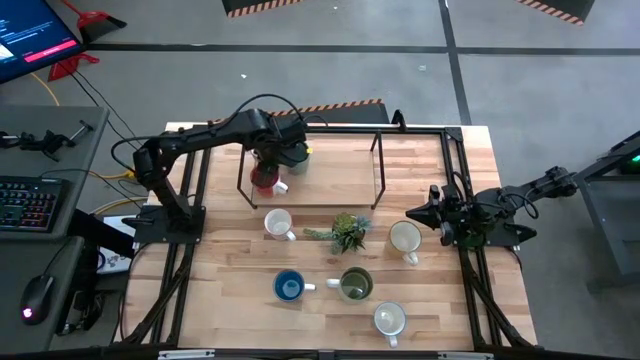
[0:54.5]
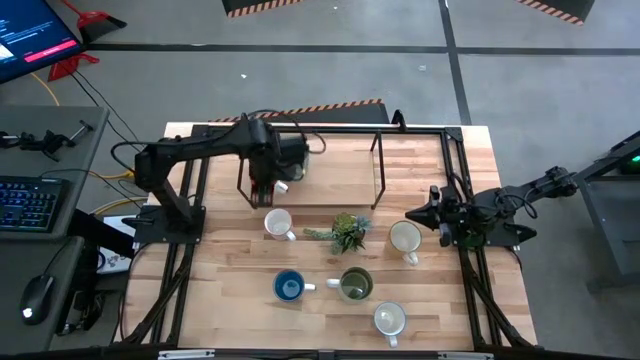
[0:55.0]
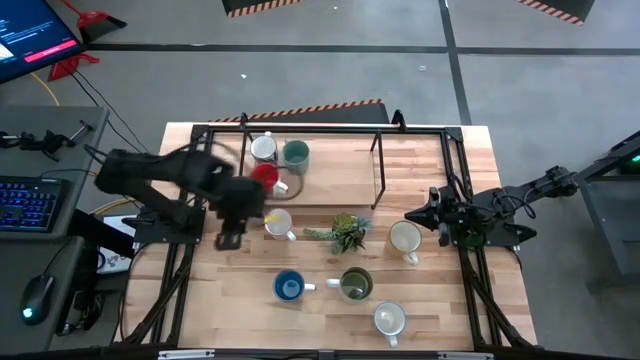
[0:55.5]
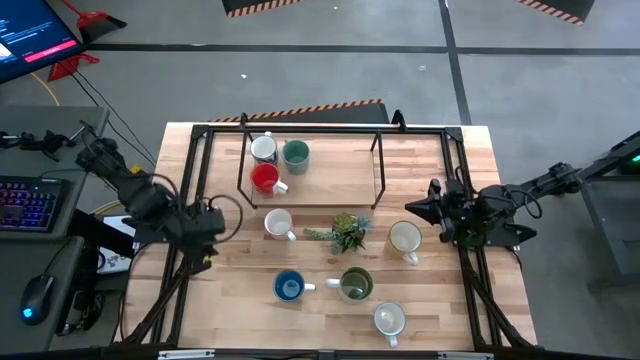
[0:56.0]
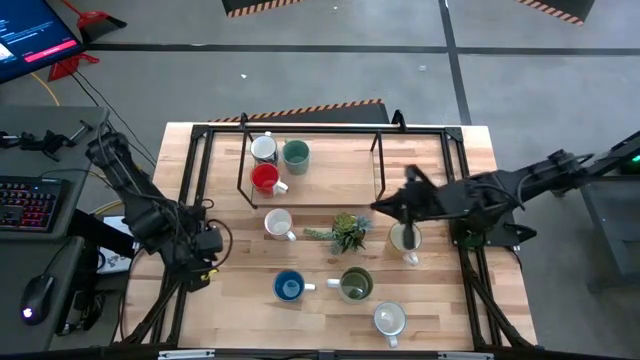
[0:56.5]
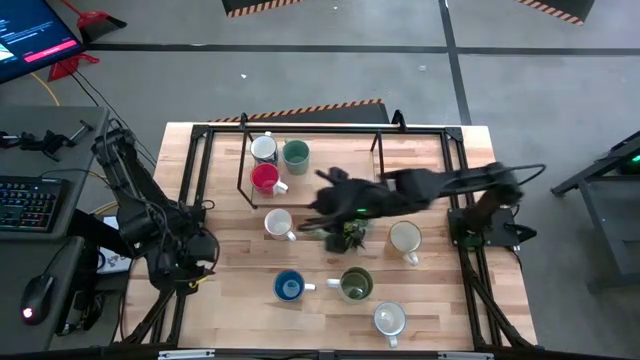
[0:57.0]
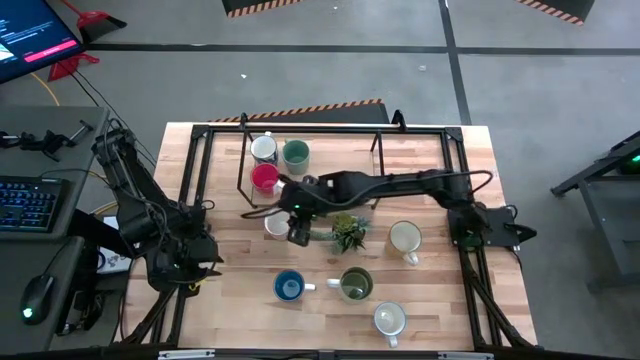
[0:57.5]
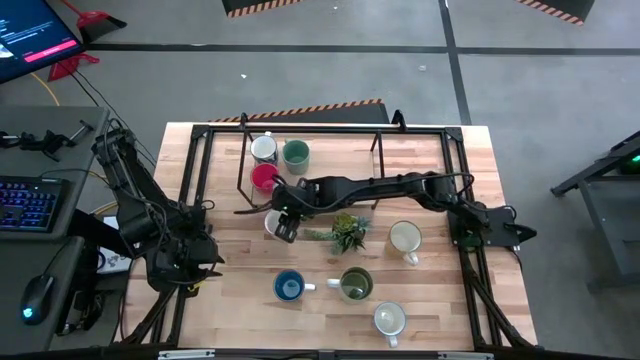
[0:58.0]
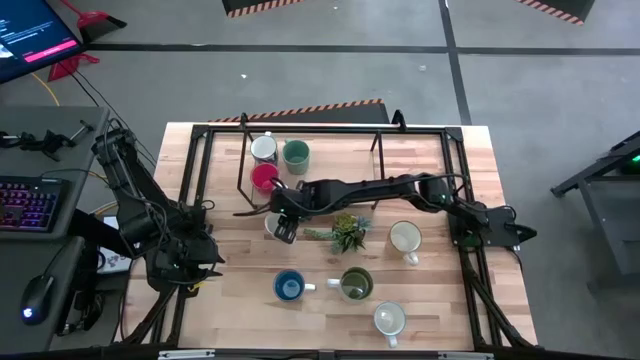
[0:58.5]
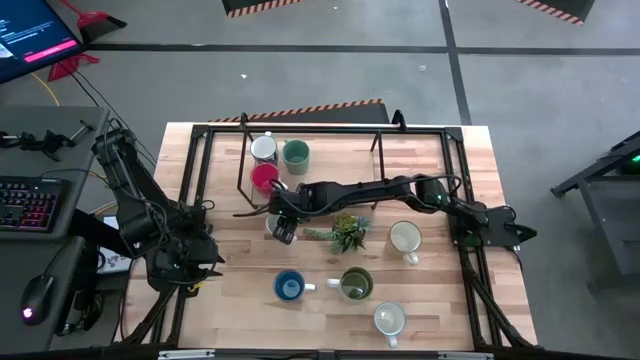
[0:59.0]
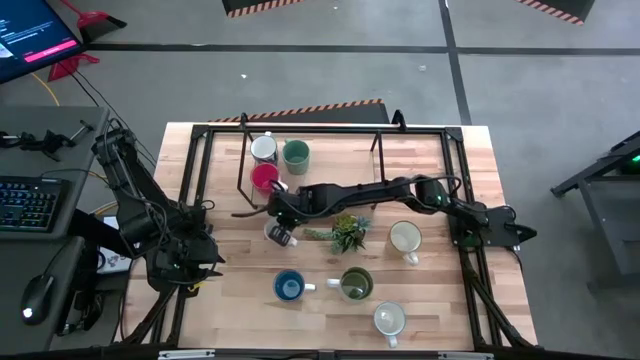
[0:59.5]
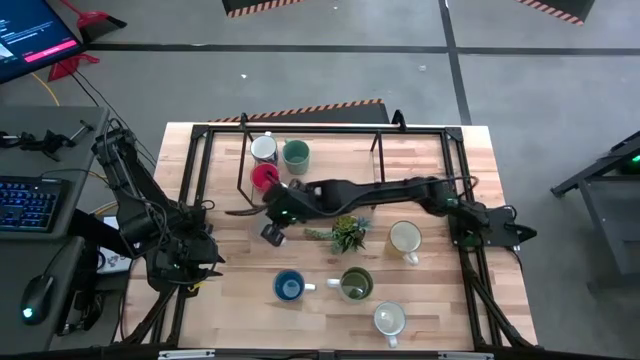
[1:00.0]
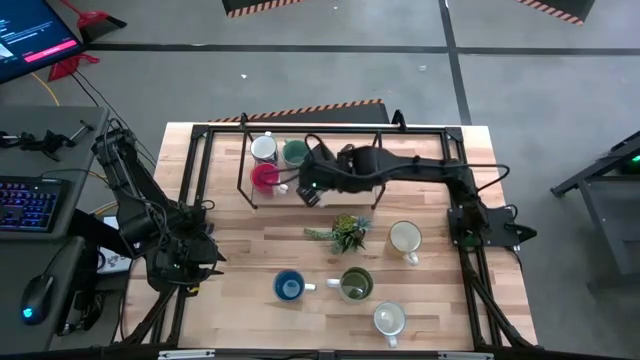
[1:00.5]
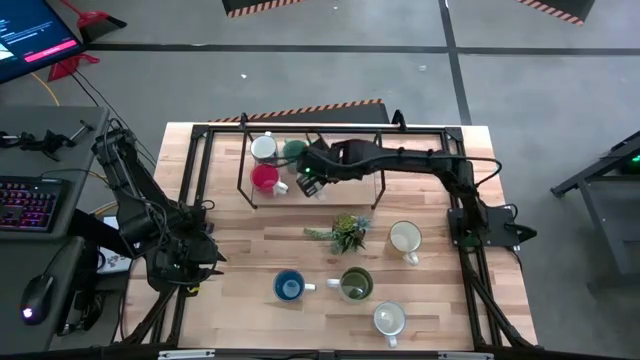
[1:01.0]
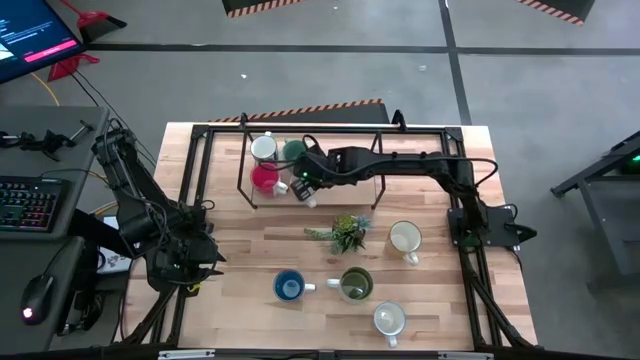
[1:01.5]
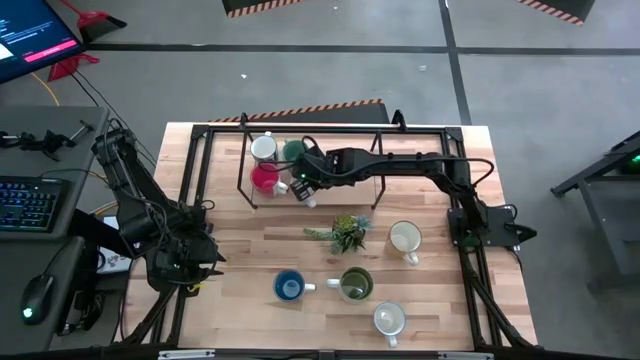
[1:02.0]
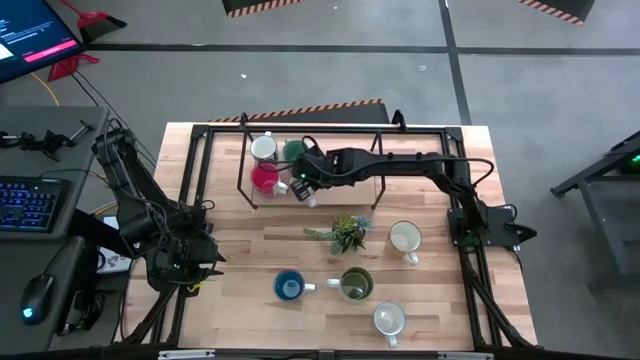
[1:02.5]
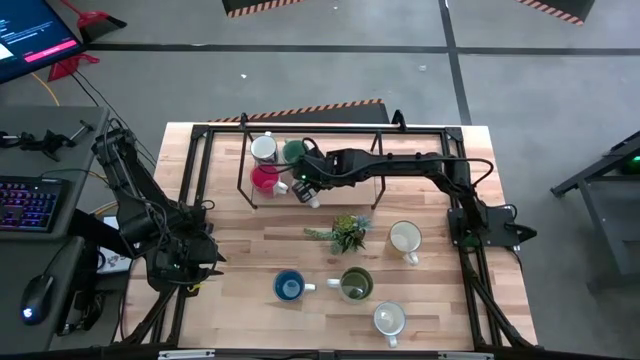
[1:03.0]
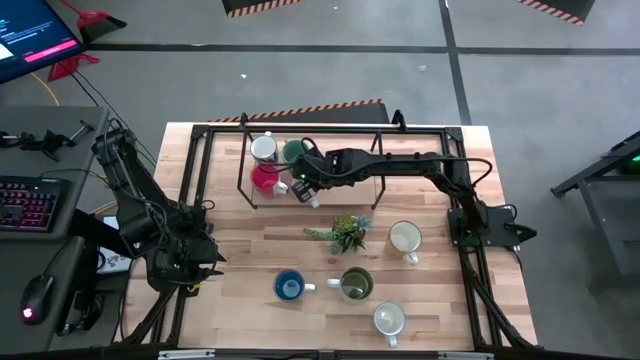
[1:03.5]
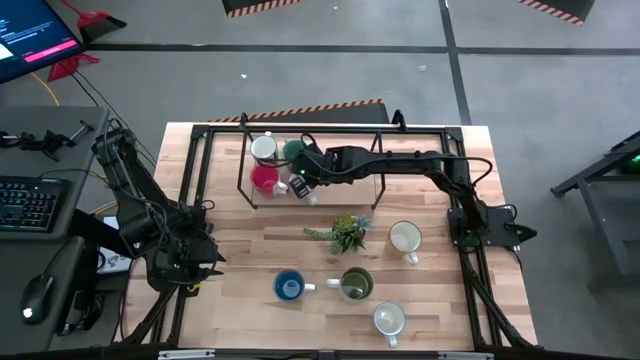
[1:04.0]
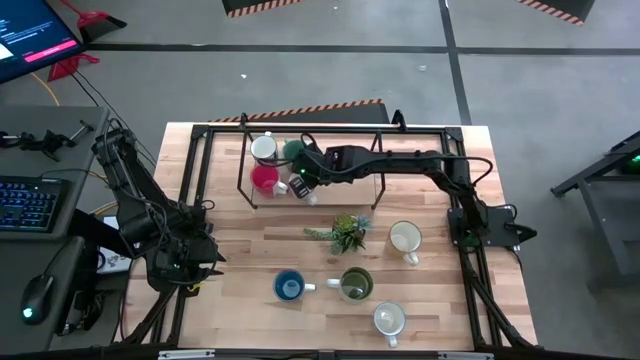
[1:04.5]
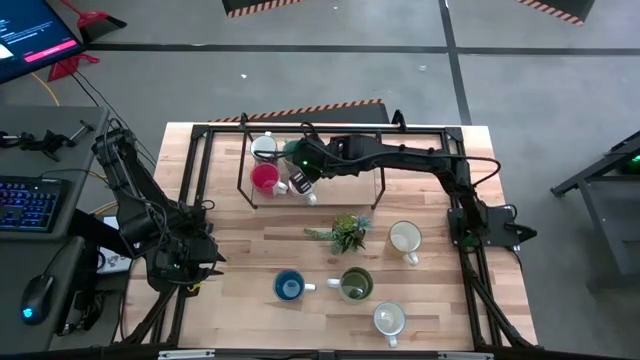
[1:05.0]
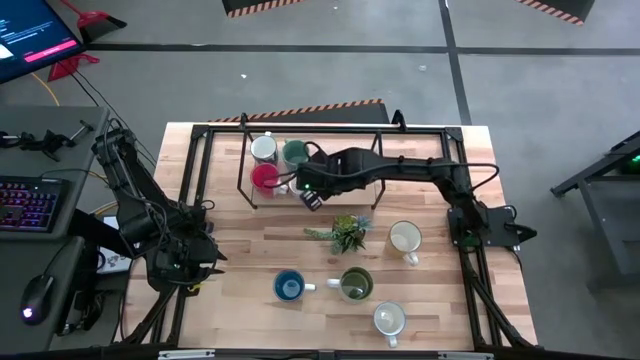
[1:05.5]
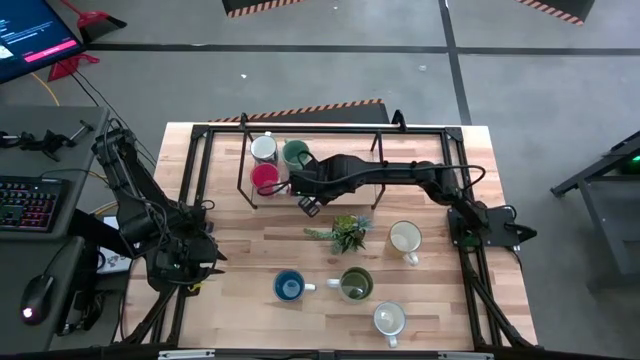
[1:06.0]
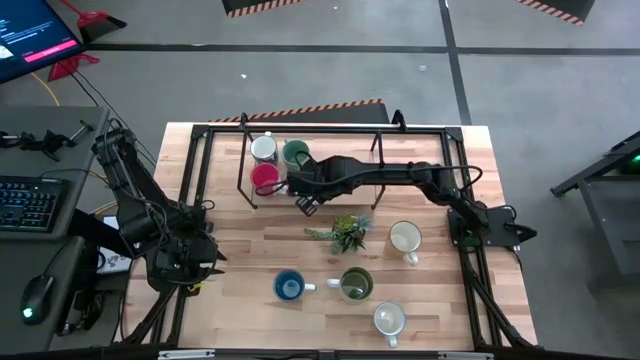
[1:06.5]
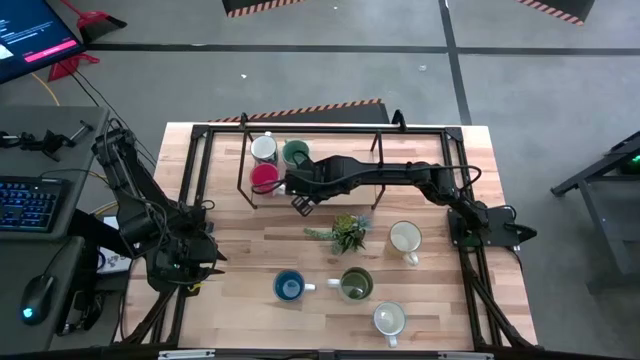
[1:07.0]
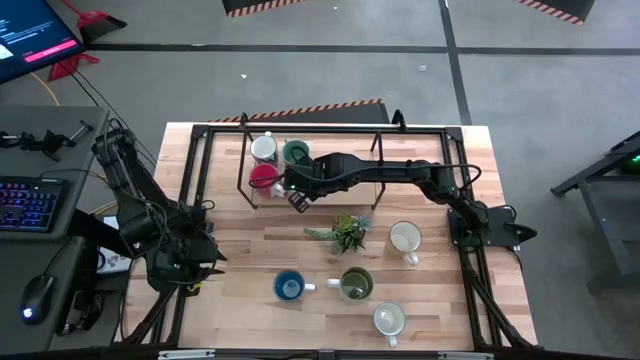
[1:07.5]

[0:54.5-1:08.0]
Task: Place coffee mugs
Put the gray patterned mug on the shelf

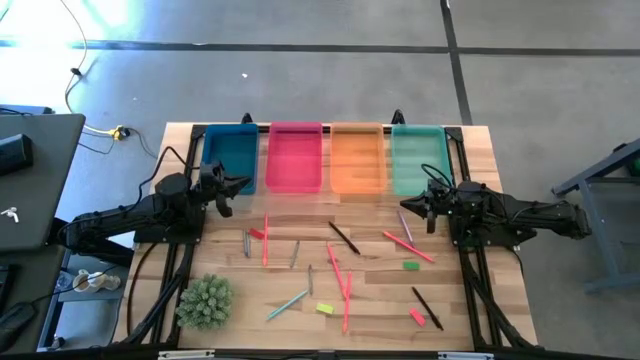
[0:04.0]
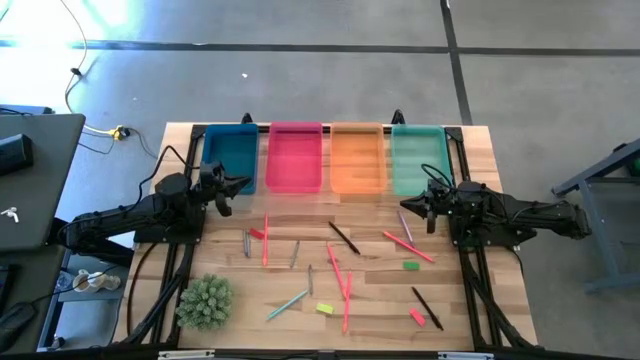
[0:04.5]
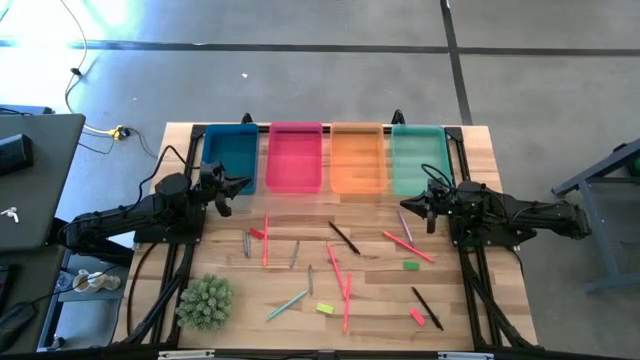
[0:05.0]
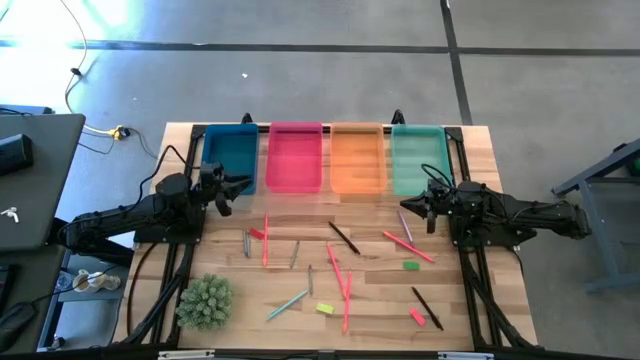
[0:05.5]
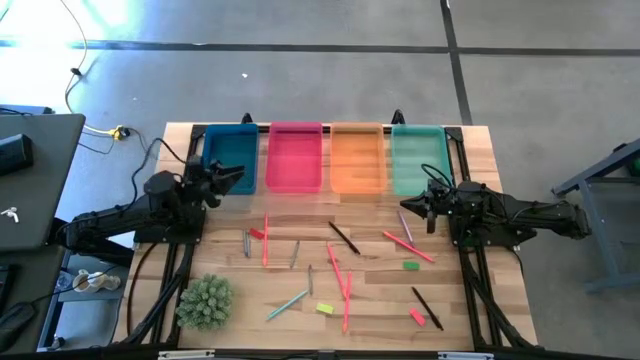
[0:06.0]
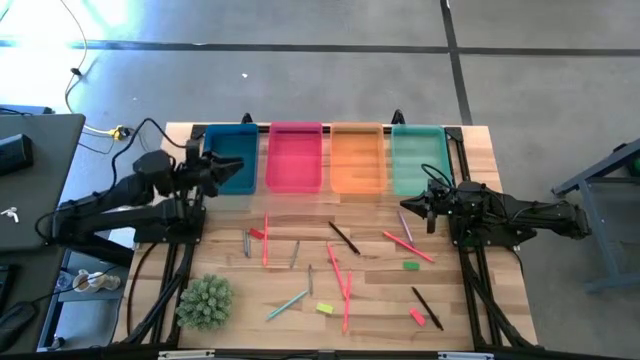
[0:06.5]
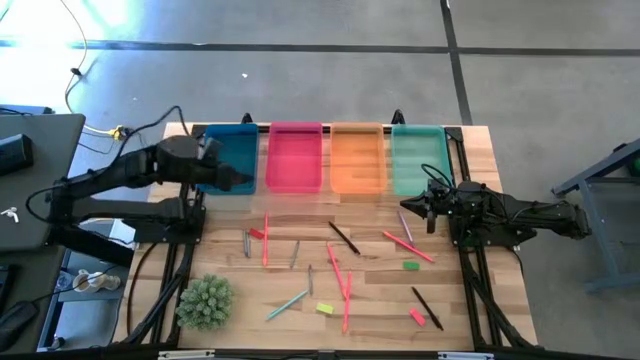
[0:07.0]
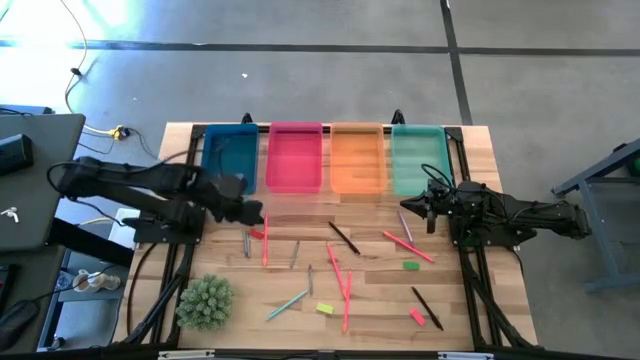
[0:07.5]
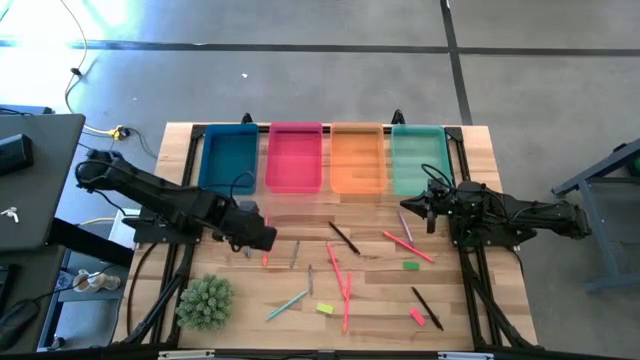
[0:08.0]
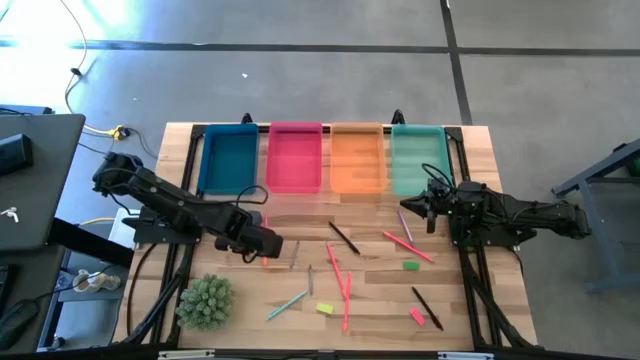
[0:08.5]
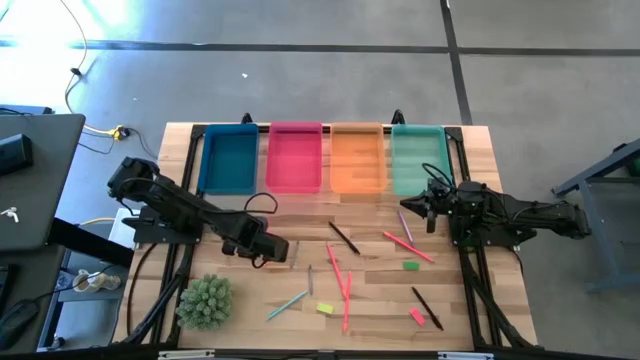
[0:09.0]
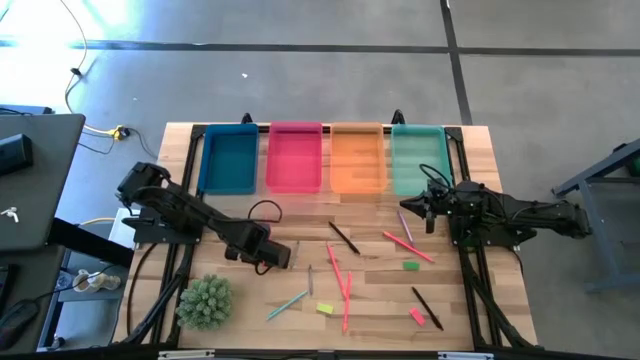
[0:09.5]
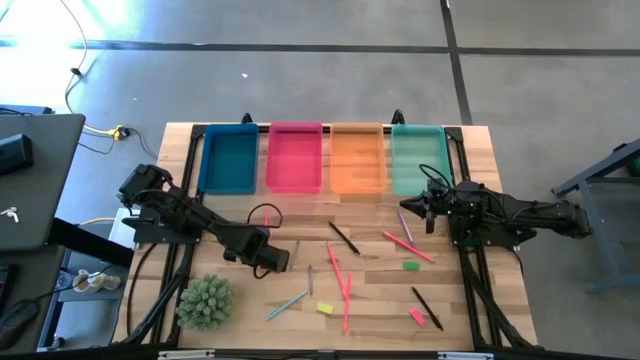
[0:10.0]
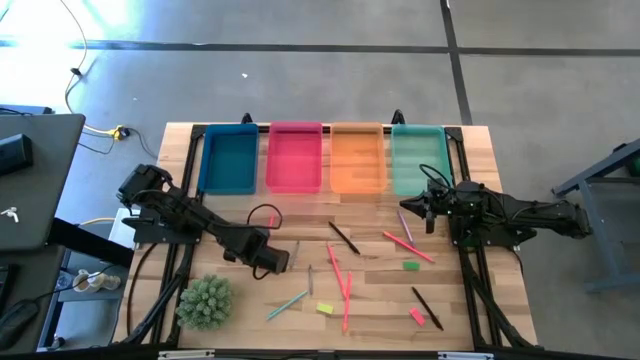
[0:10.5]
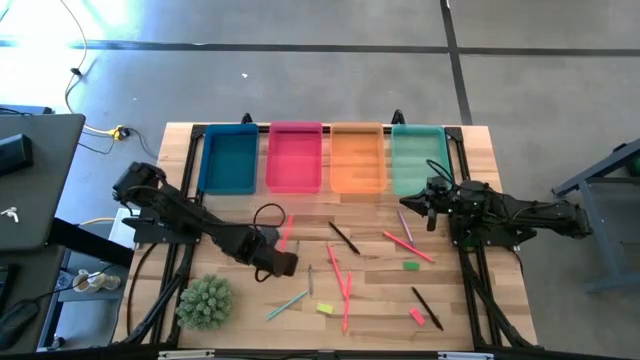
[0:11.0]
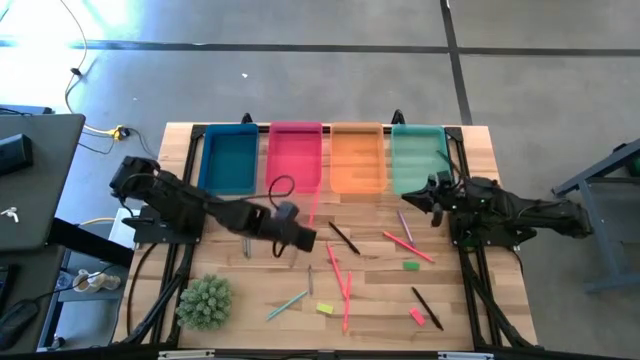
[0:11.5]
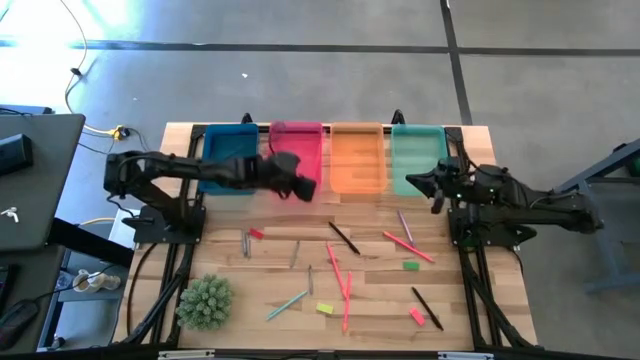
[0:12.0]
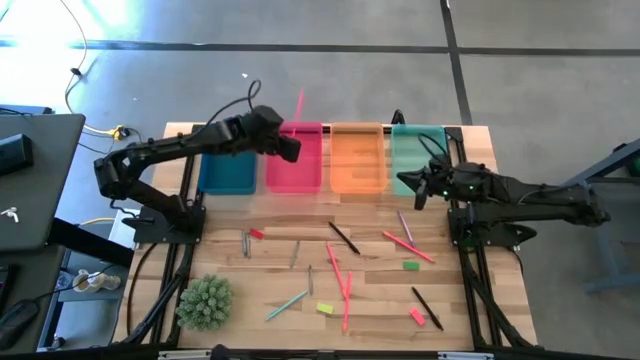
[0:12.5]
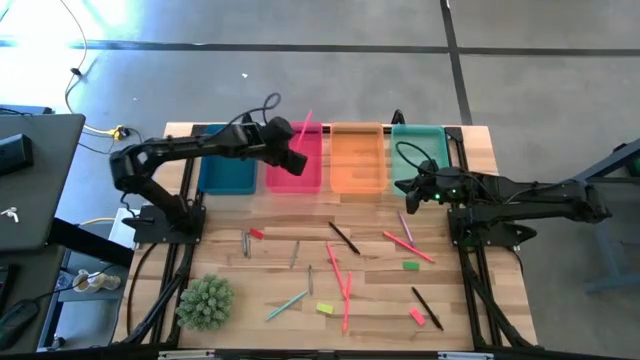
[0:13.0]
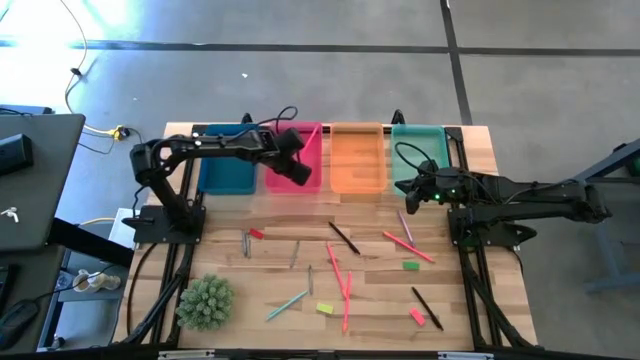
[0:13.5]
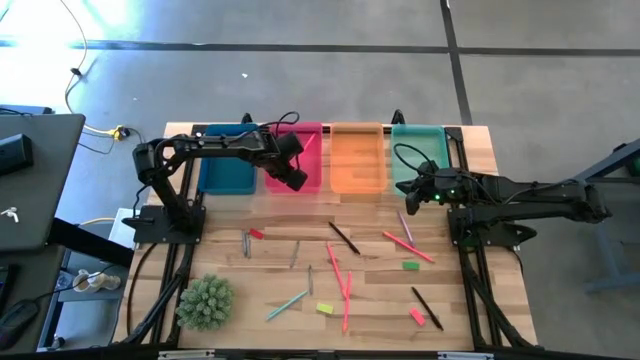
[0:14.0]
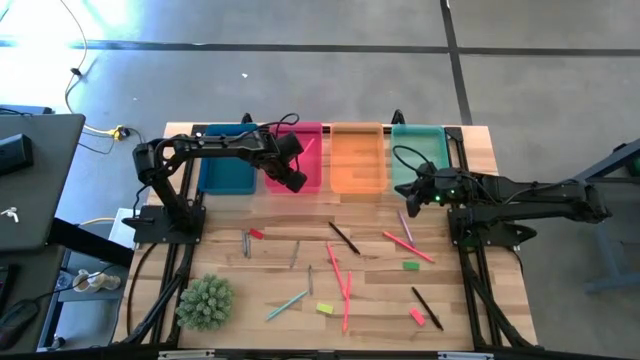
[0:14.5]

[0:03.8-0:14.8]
Task: Sort crayons/erasers/pens/pencils in bins
Put the pink pencil into the pink bin
